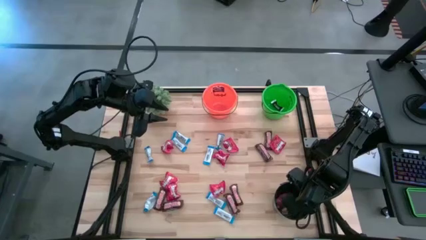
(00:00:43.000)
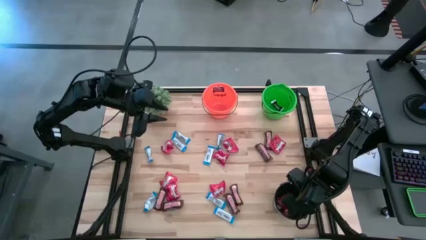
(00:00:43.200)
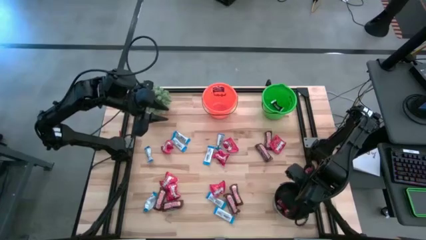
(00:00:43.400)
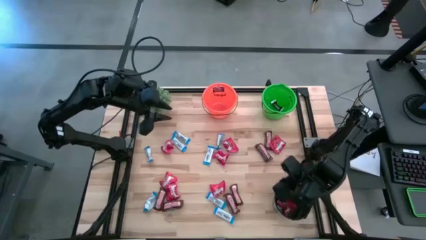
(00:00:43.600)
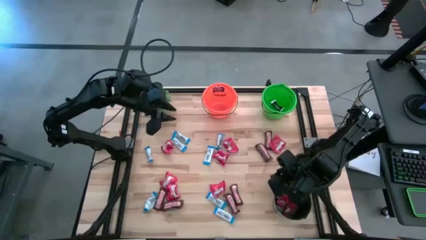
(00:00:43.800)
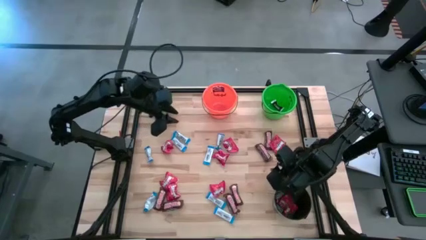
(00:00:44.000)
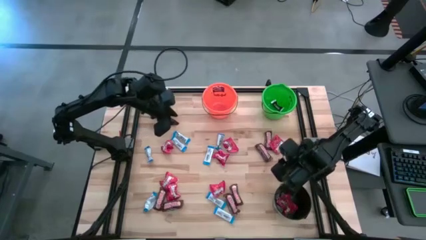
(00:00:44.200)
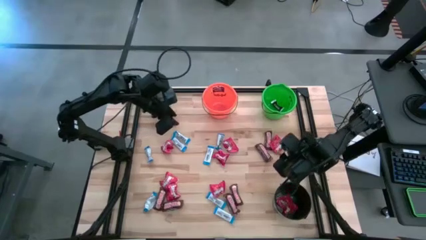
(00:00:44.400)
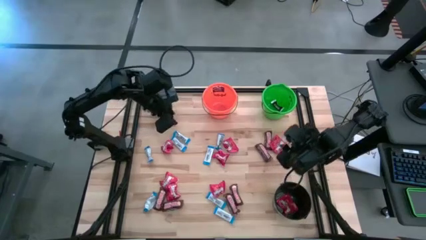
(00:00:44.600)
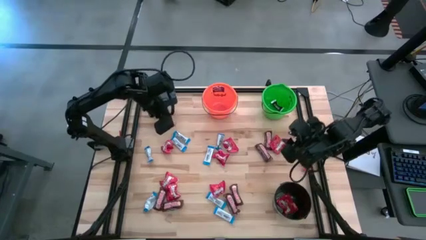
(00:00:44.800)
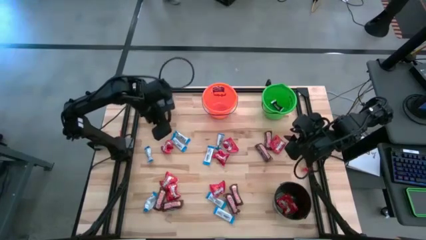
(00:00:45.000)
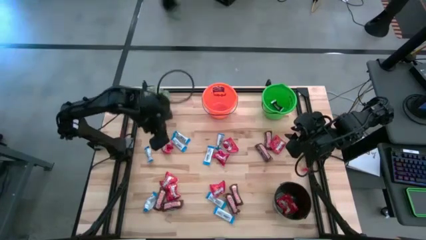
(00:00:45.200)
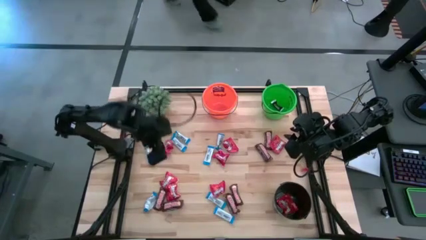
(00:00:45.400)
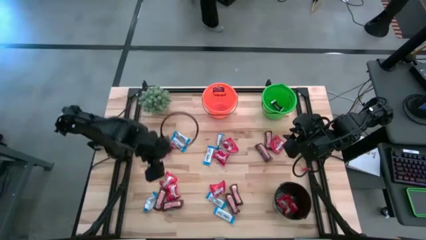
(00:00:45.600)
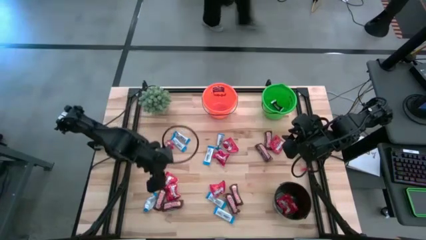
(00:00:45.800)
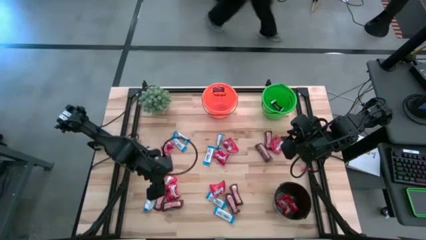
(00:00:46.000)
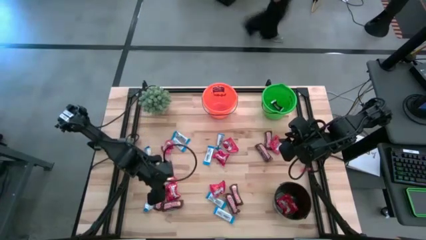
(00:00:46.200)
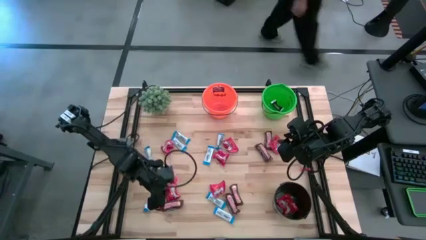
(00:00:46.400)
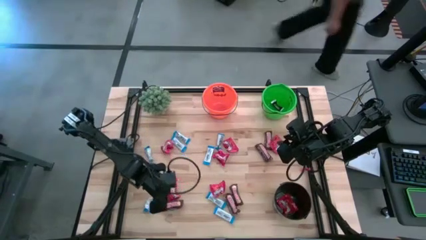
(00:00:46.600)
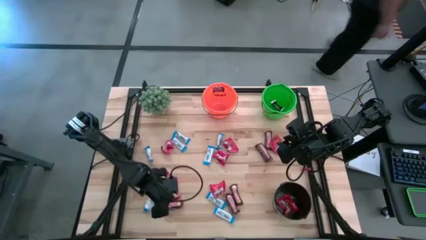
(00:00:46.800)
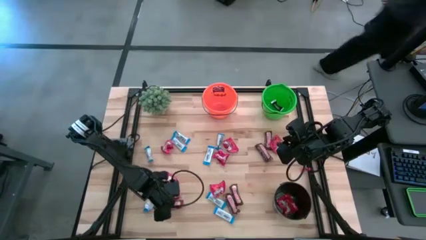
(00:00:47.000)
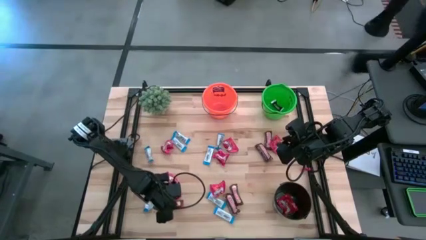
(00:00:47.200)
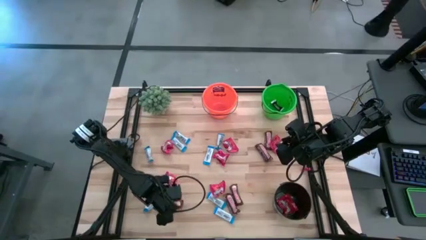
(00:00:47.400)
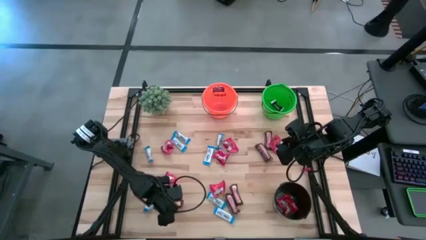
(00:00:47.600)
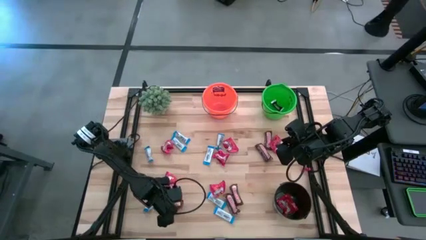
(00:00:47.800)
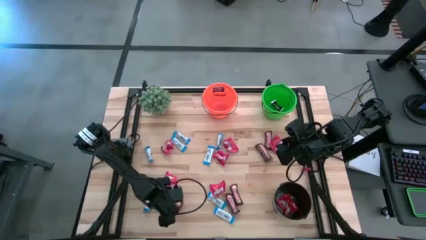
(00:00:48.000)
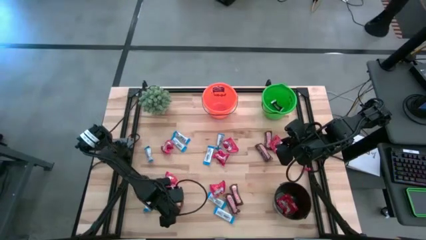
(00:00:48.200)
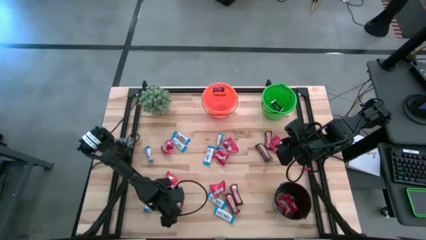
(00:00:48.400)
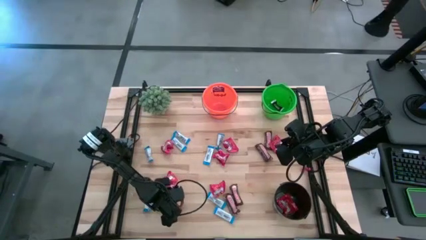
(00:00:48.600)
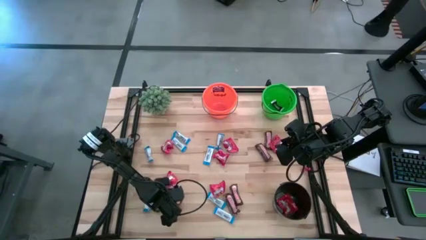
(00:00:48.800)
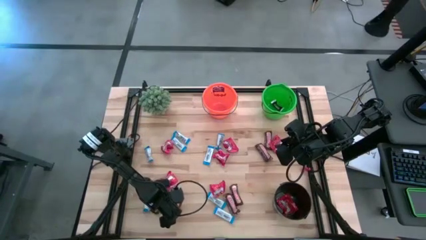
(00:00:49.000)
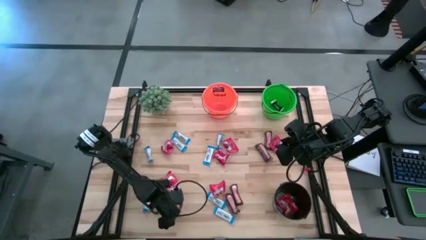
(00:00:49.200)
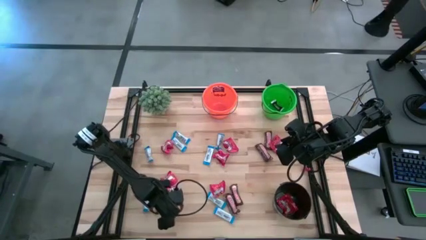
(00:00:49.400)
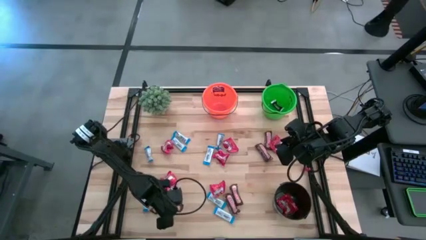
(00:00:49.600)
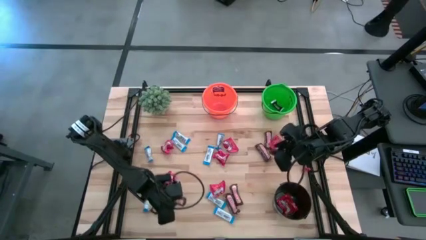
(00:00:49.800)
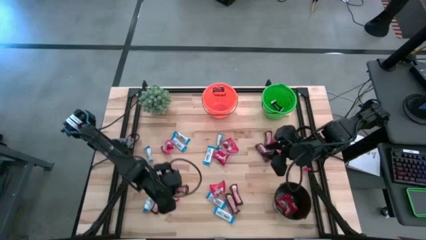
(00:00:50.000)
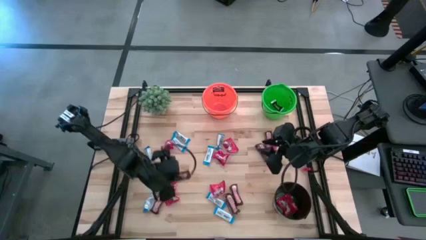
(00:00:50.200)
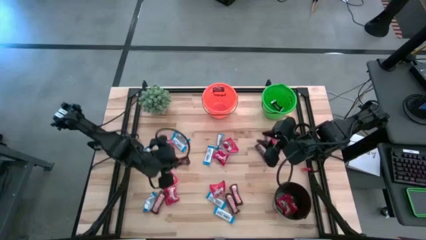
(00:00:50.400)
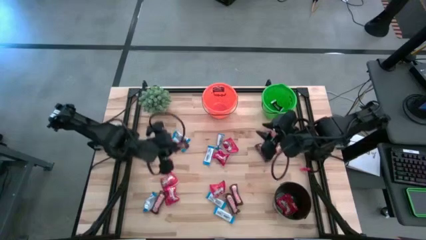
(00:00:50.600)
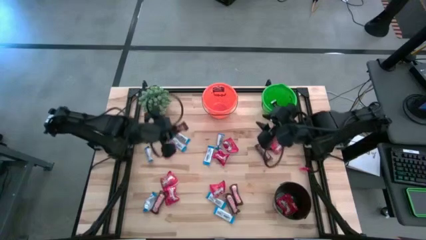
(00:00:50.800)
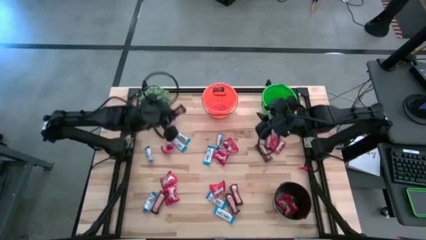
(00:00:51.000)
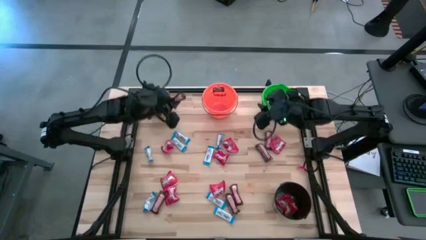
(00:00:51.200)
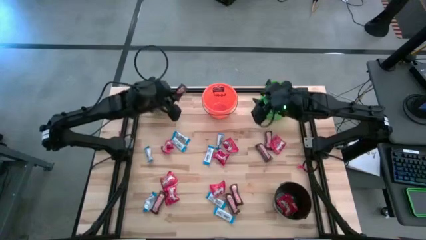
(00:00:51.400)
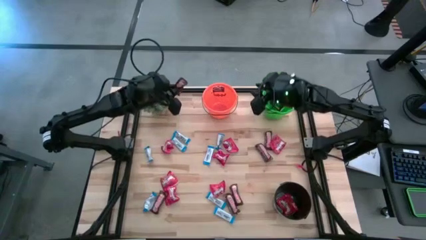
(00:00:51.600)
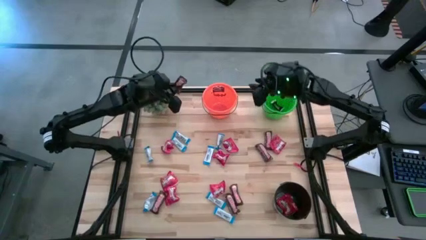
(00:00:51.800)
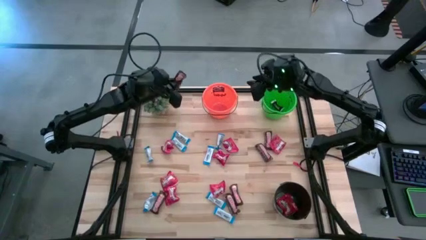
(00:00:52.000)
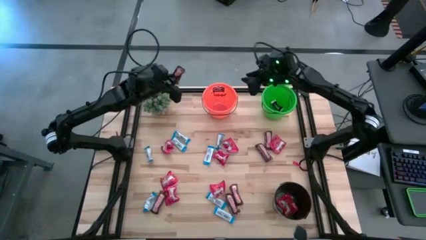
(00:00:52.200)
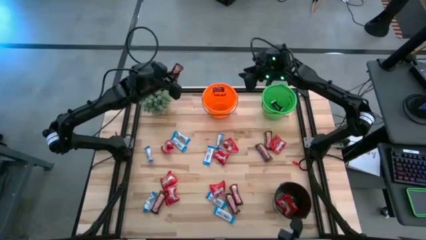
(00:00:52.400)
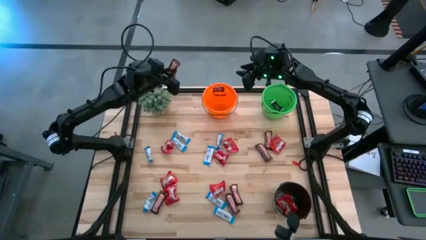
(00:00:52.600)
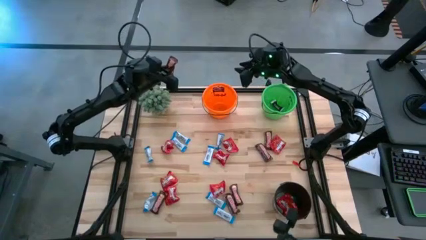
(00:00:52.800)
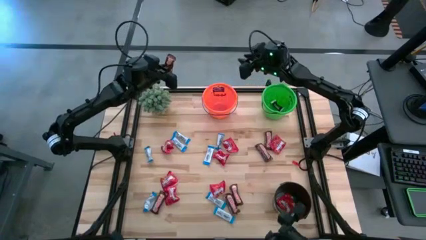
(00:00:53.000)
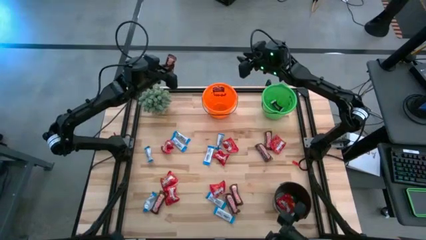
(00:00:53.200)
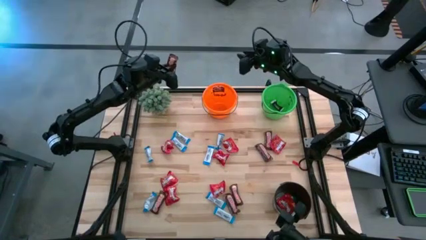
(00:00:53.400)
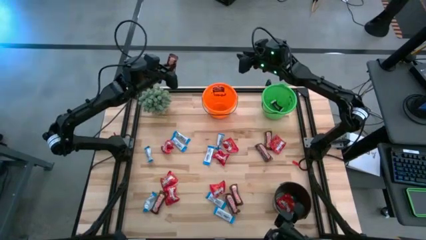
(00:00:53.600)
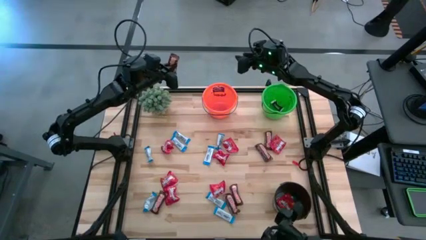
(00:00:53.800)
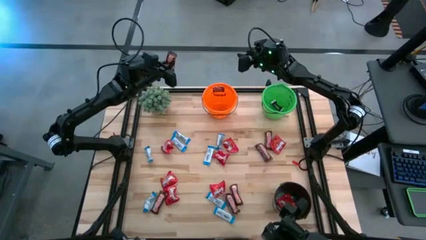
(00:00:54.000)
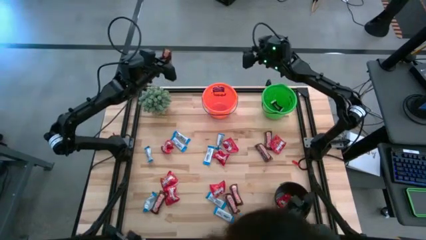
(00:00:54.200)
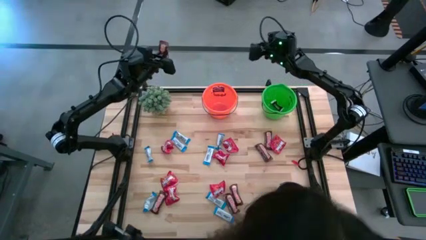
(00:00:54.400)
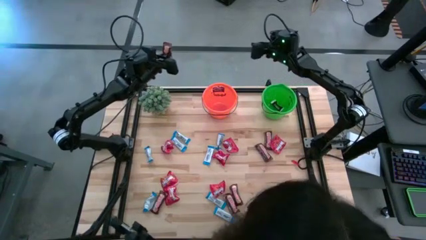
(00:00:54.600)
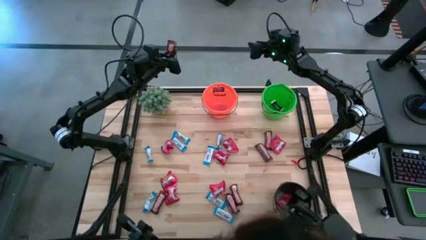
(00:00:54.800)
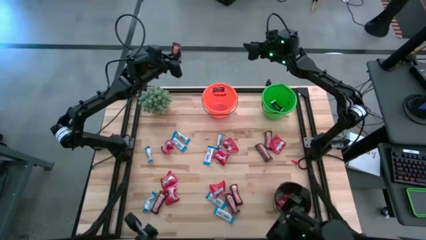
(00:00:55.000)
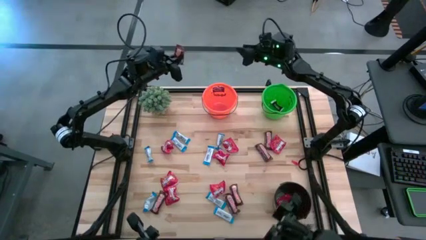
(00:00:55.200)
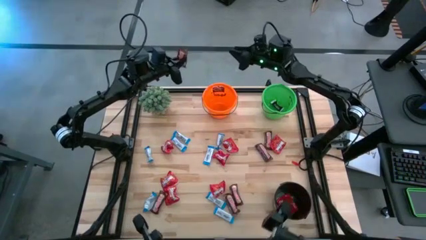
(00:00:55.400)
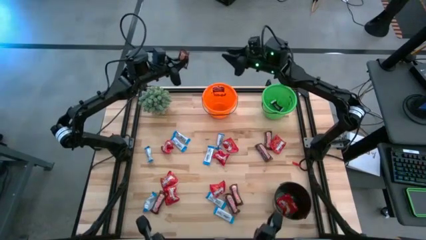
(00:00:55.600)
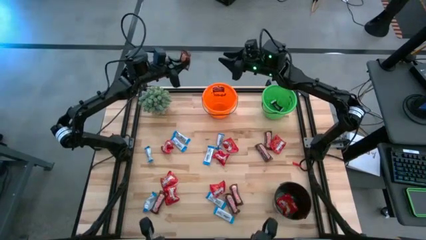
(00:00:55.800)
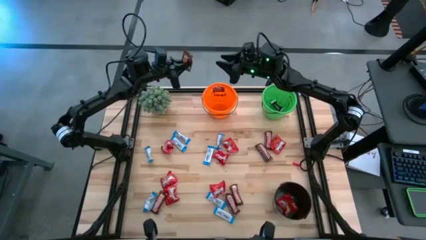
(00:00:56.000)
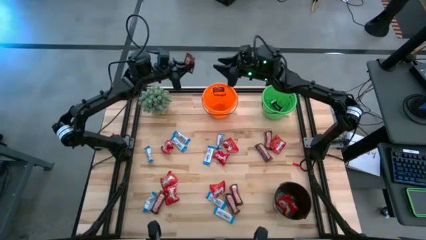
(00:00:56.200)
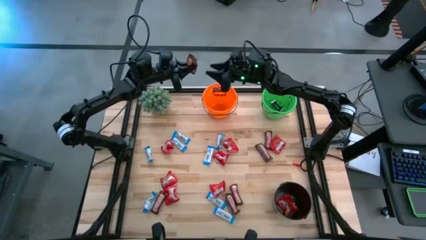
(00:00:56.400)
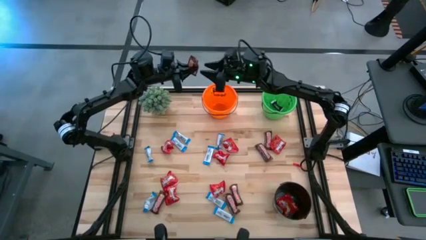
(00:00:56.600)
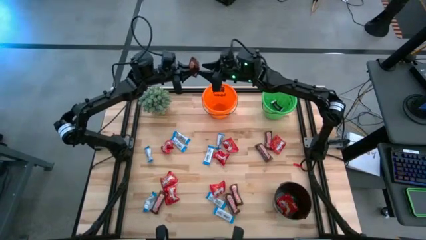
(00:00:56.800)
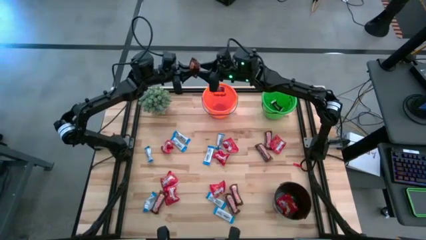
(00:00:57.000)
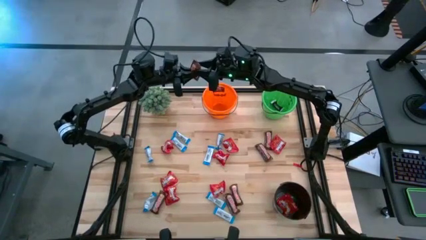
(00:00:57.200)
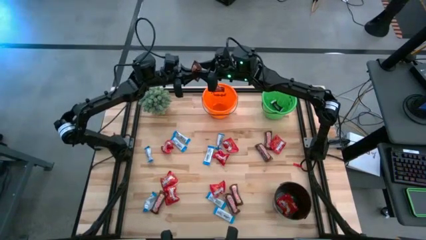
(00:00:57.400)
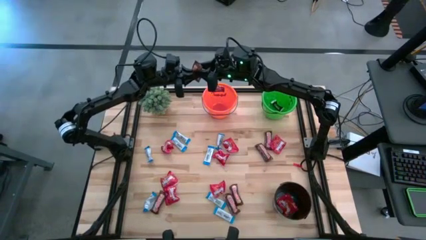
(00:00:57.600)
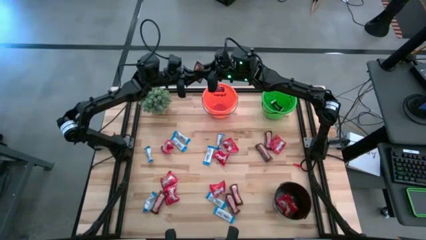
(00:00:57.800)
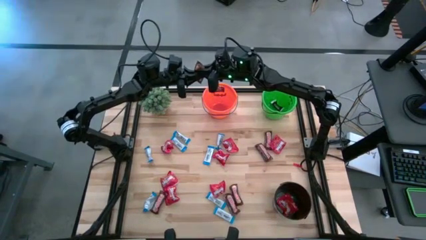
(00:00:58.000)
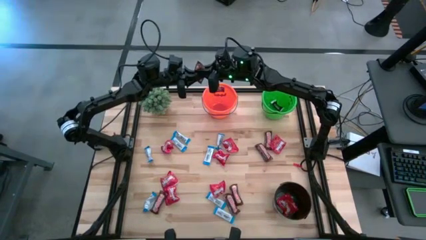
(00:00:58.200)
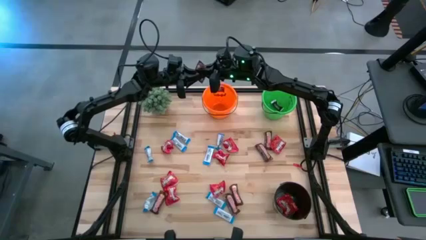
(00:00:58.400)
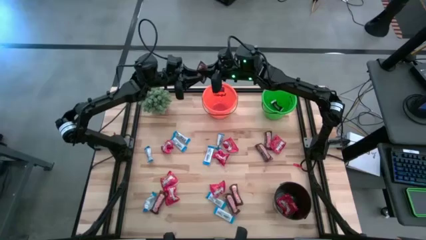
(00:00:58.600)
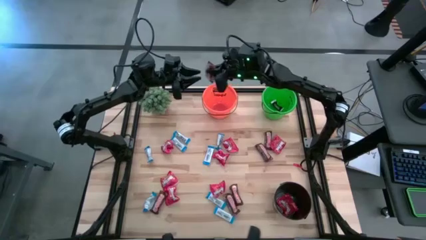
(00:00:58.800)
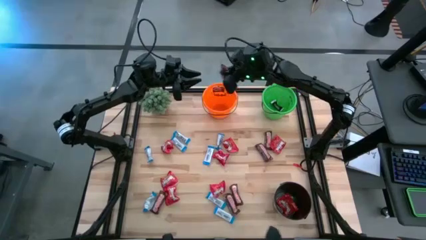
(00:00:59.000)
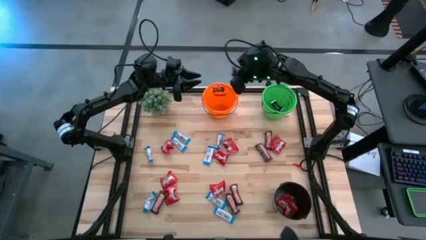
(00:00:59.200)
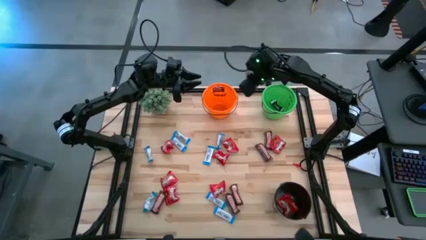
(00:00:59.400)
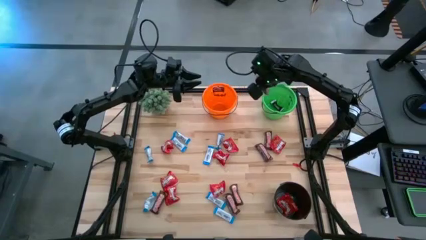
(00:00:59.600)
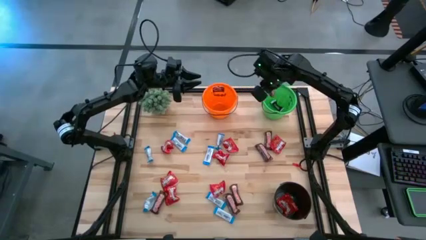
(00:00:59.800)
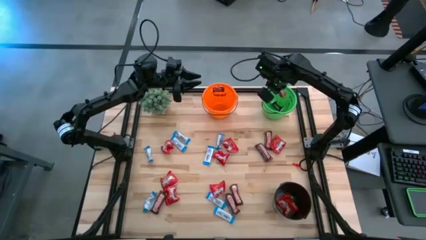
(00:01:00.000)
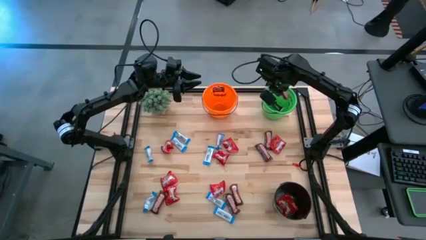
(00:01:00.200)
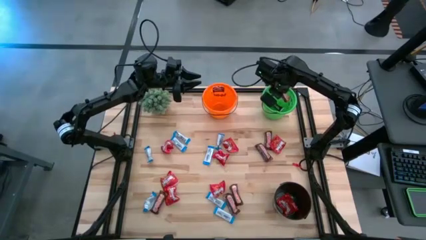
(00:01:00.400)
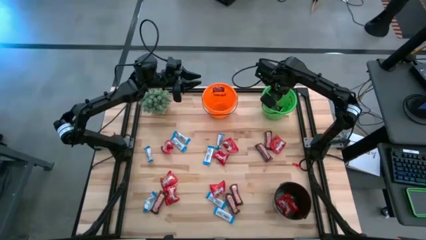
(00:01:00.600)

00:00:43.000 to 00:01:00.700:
Task: Organize candy in baskets
Put the brown chocolate into the green bucket
